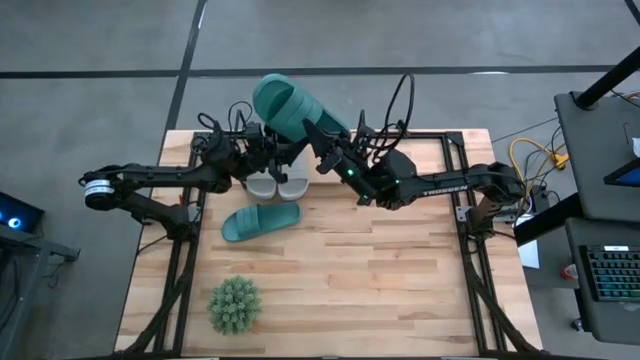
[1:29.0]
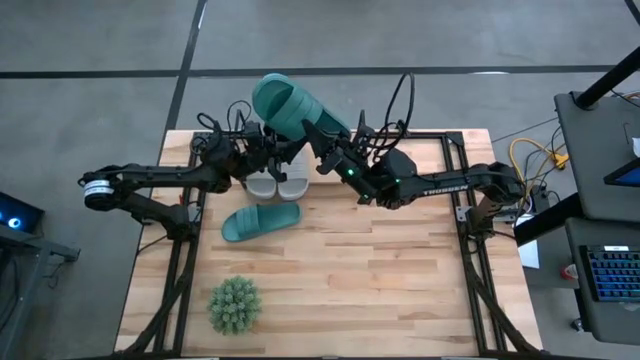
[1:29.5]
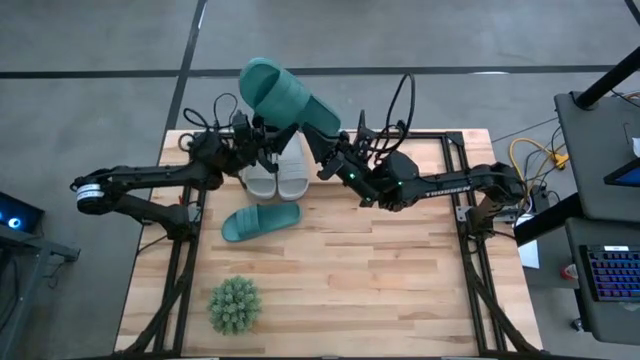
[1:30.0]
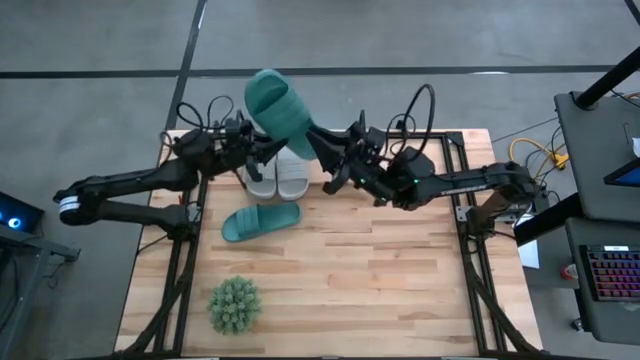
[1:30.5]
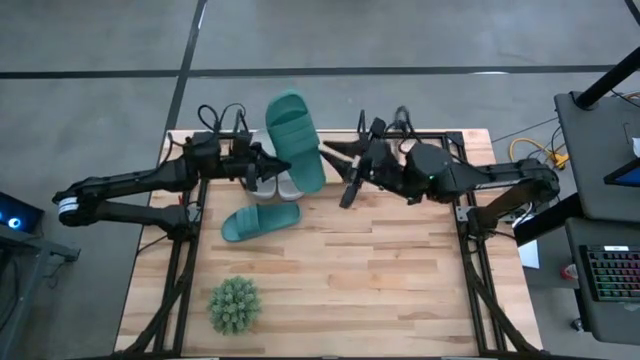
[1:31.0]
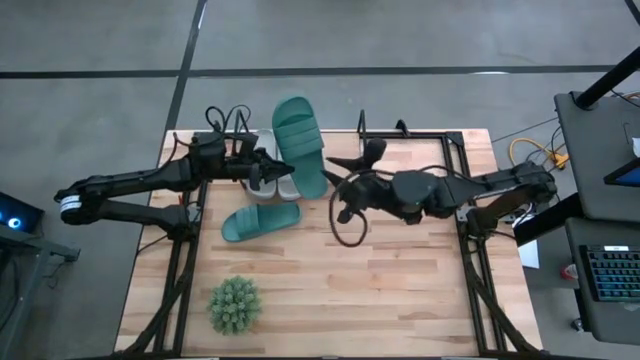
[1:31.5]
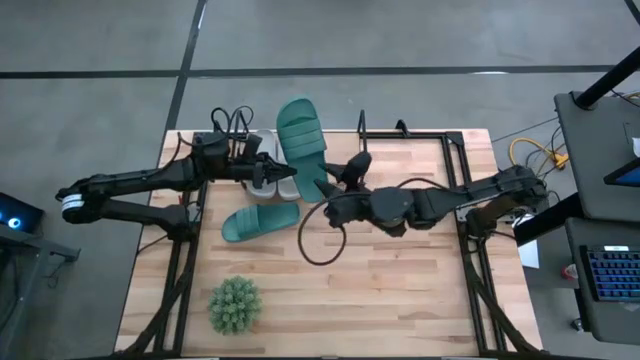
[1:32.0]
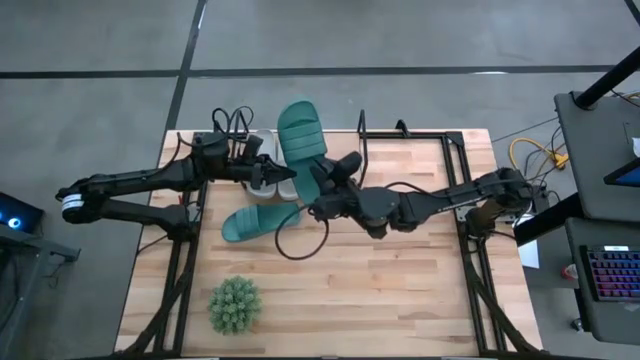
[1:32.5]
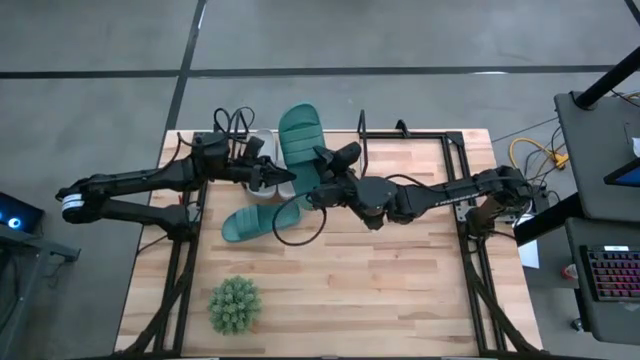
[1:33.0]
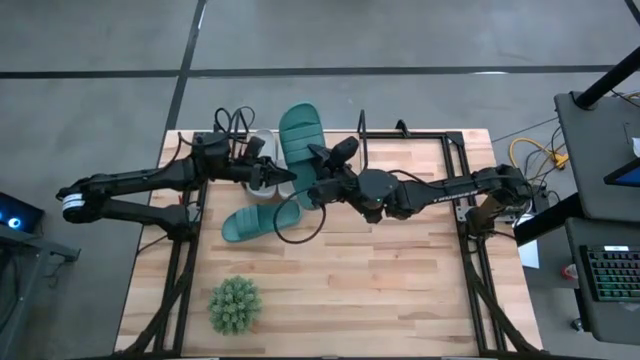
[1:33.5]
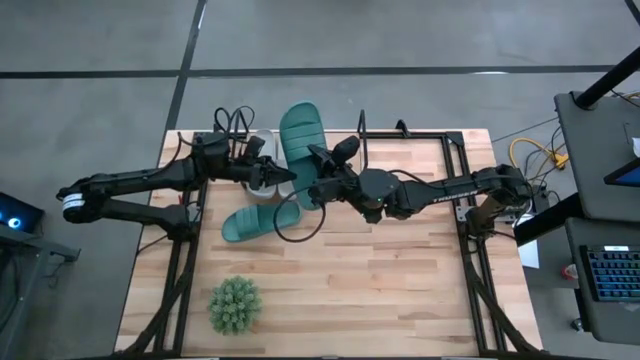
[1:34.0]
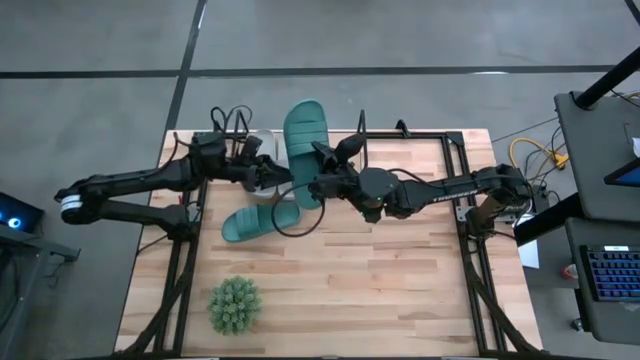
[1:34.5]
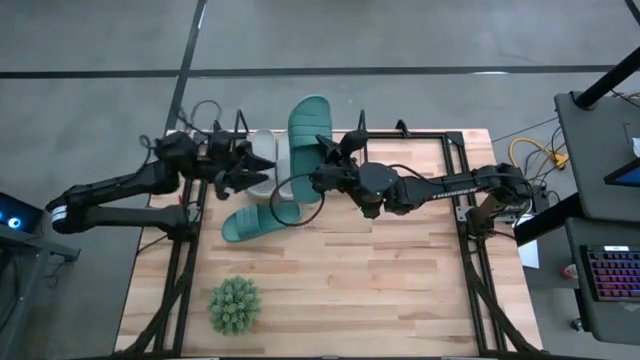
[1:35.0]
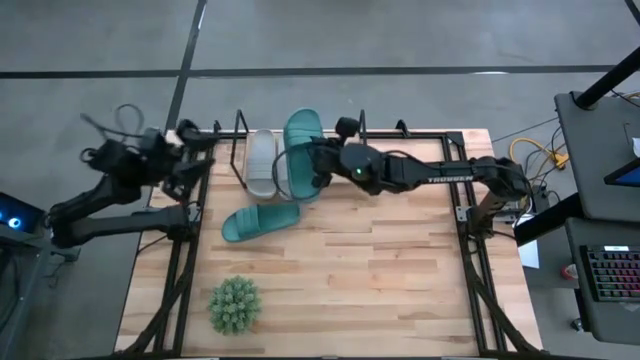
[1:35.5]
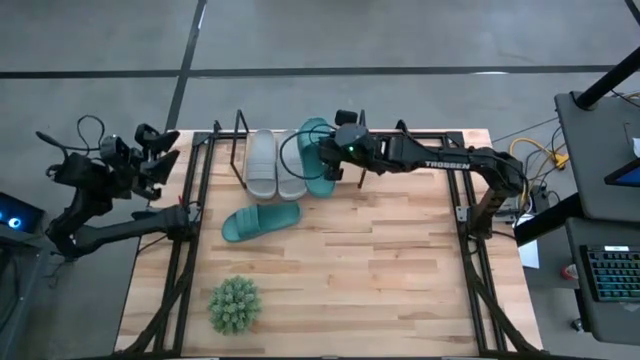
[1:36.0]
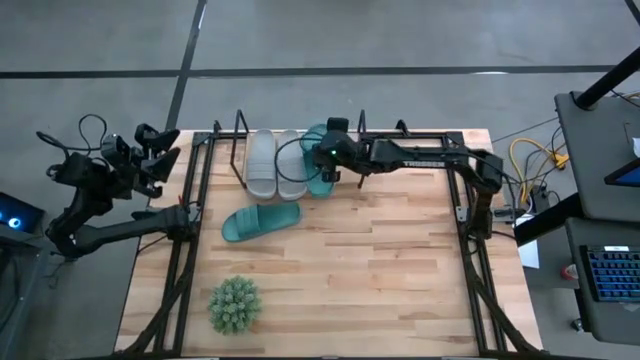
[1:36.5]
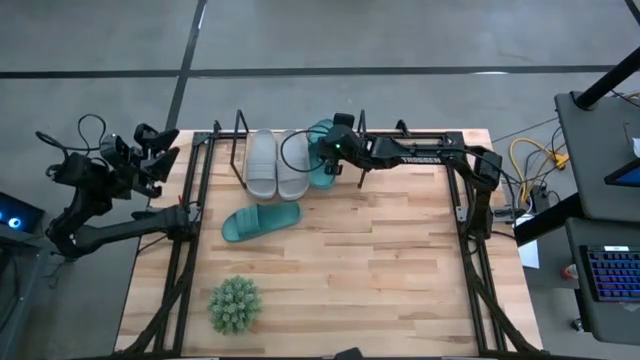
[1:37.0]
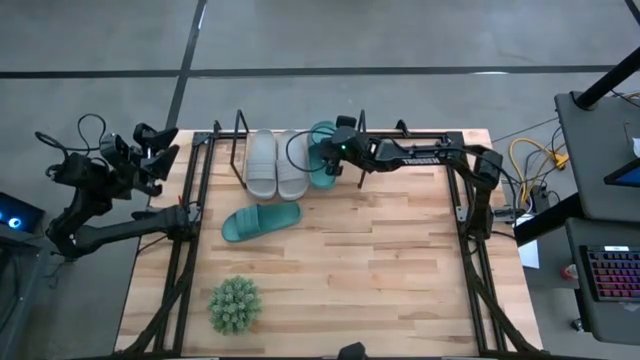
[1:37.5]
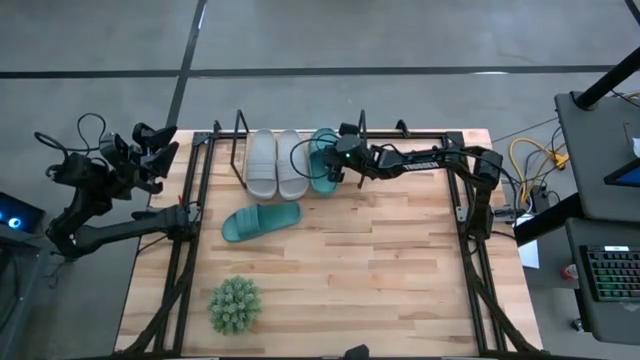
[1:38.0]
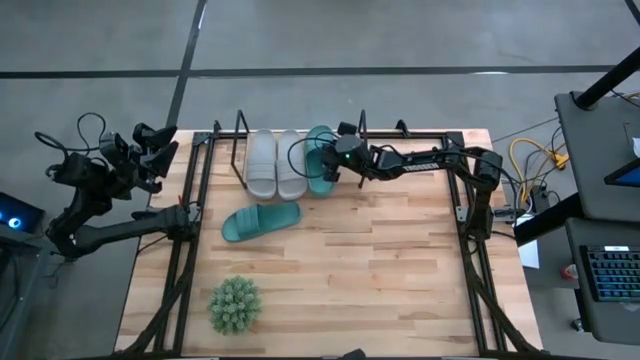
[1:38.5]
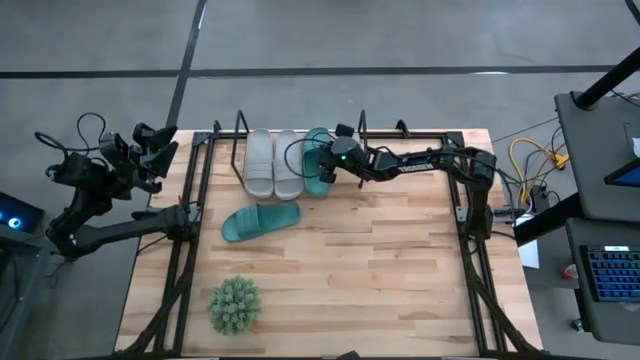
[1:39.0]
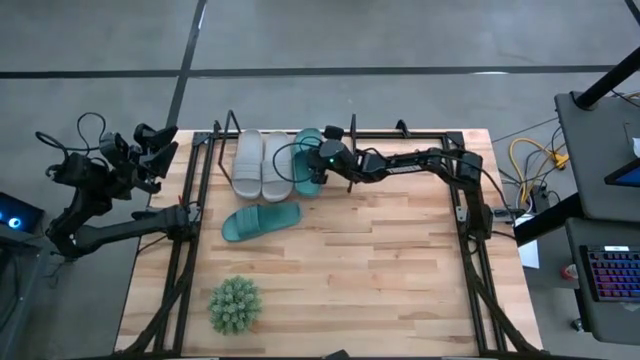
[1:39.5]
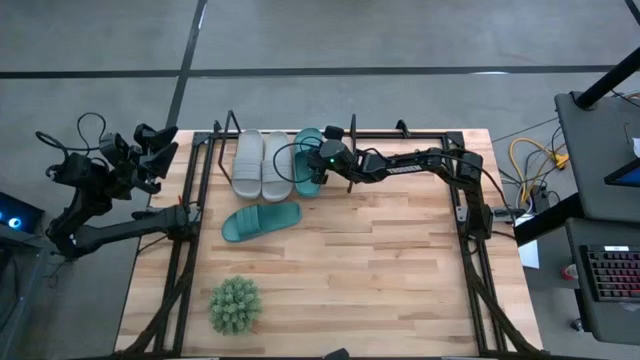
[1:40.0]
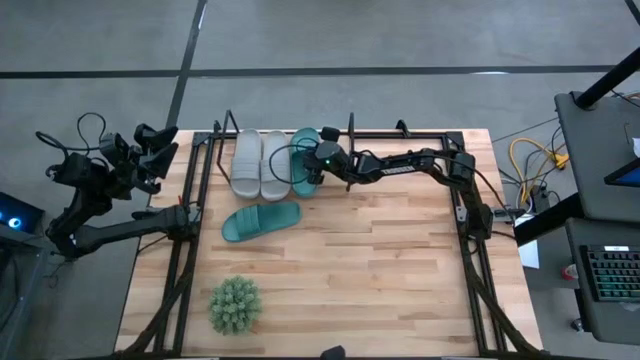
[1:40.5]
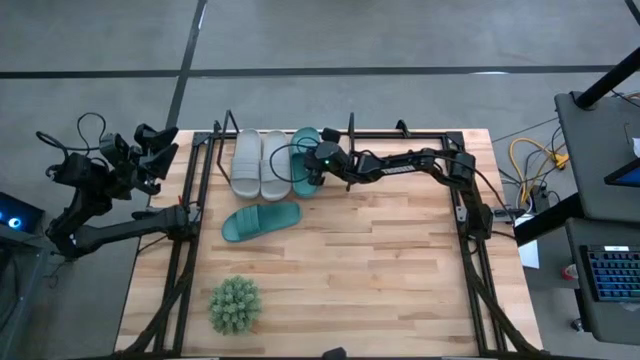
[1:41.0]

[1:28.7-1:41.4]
Task: Pick and place slides into the shelf
Put the bottom green slipper on the shelf

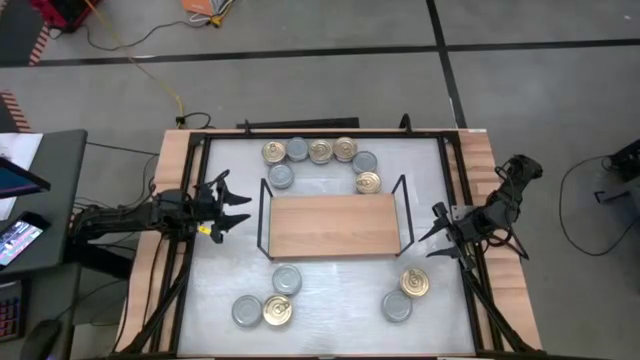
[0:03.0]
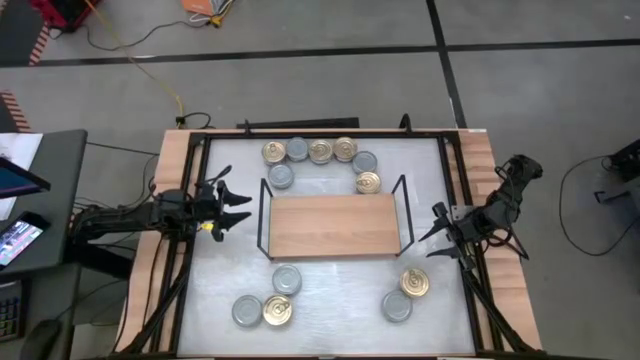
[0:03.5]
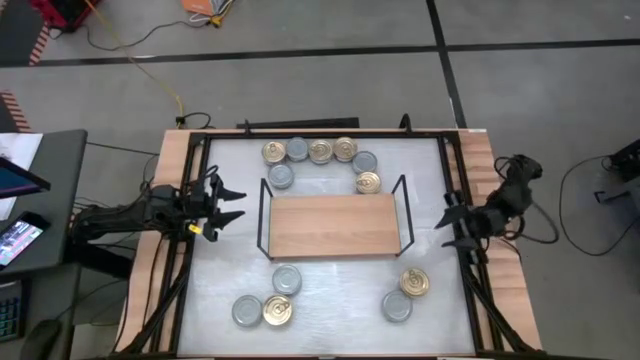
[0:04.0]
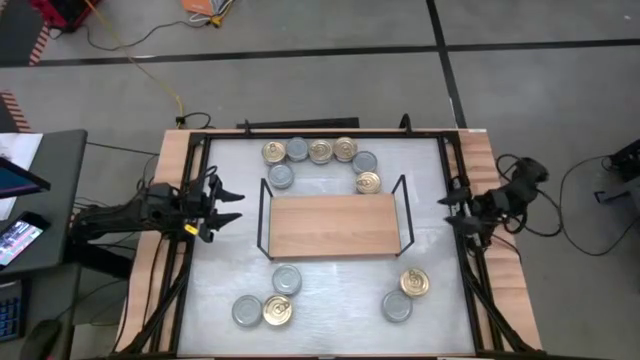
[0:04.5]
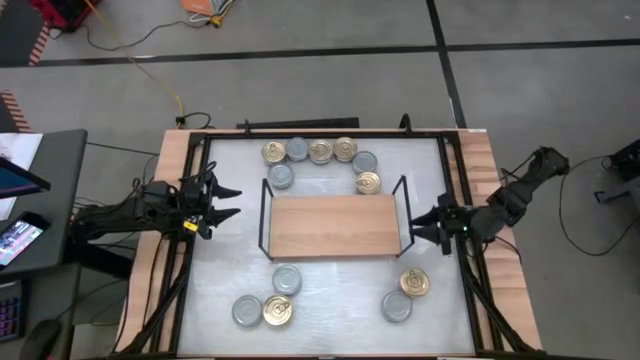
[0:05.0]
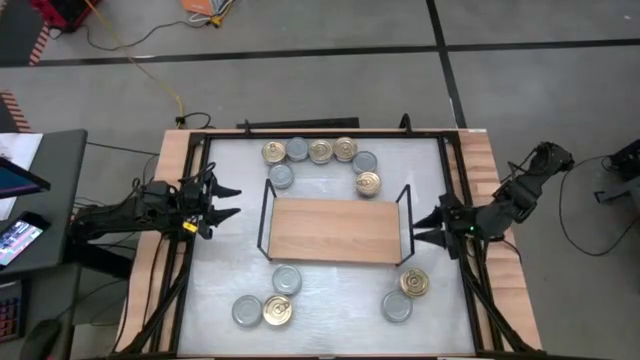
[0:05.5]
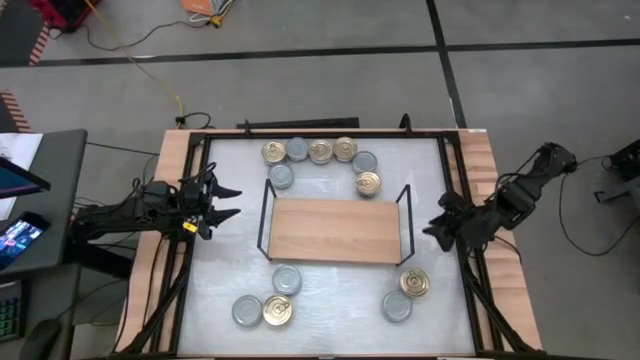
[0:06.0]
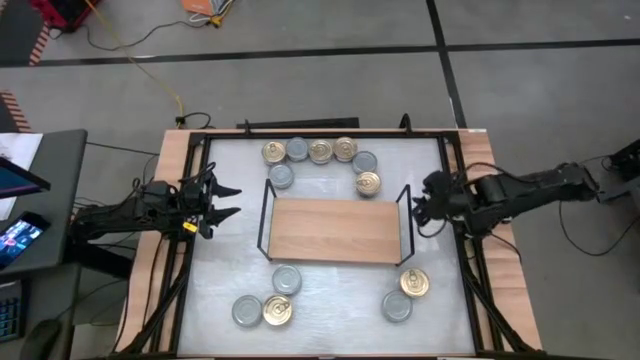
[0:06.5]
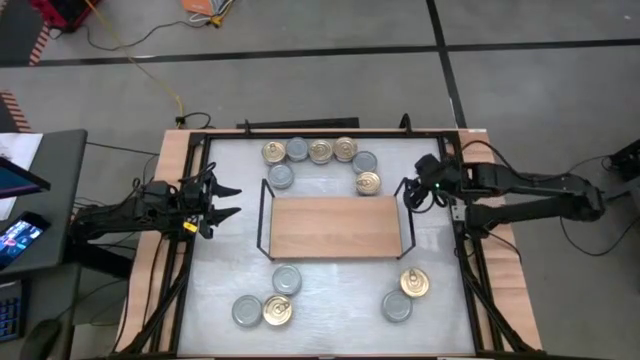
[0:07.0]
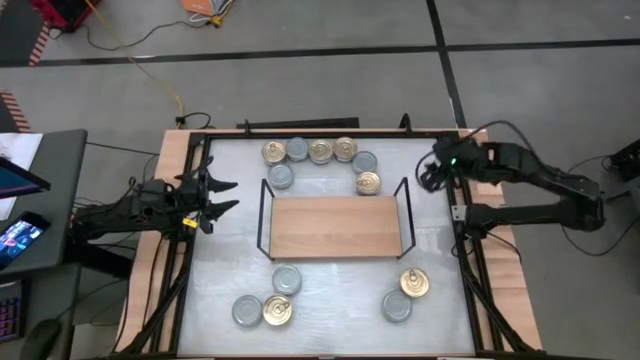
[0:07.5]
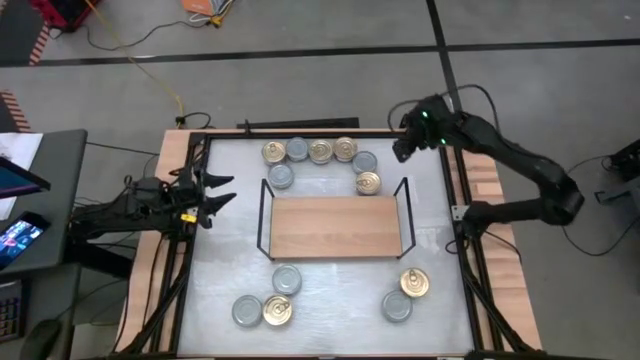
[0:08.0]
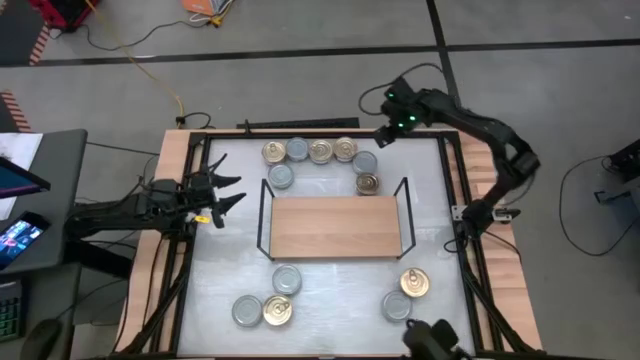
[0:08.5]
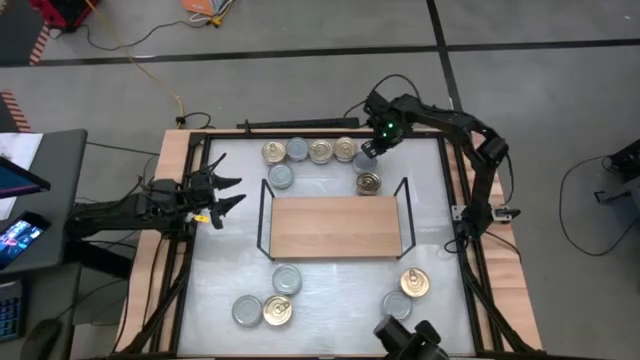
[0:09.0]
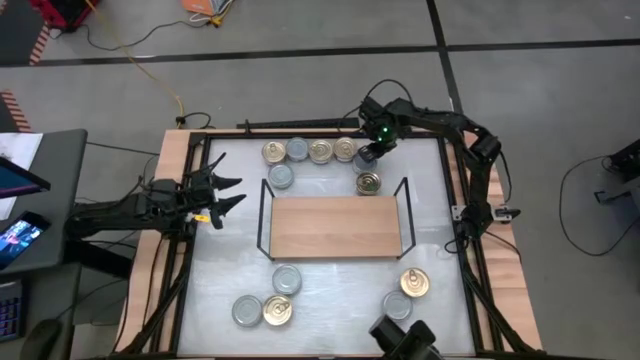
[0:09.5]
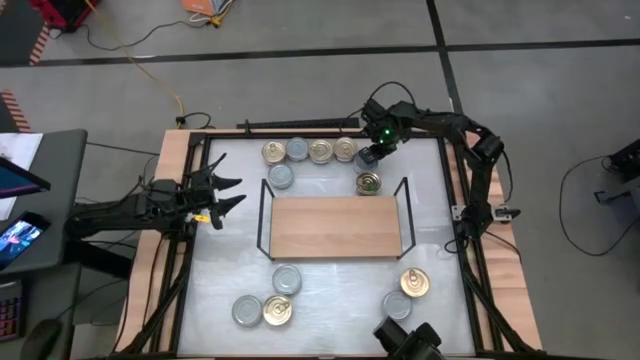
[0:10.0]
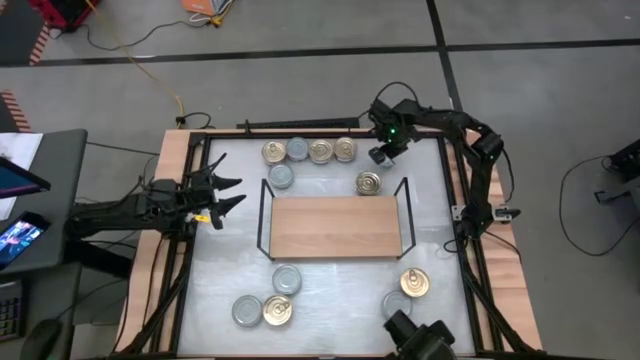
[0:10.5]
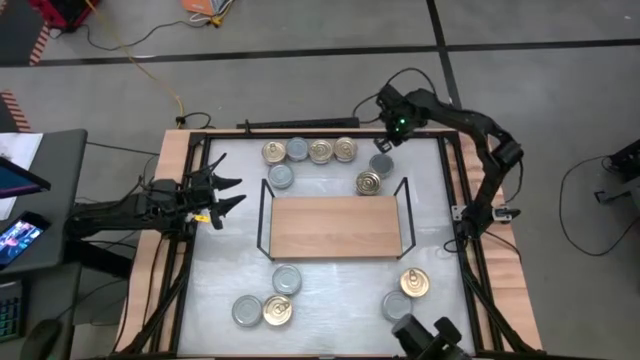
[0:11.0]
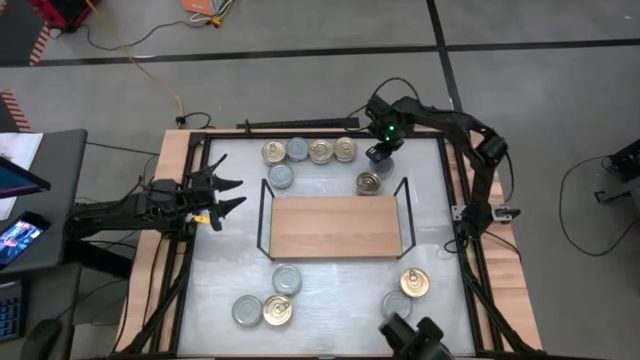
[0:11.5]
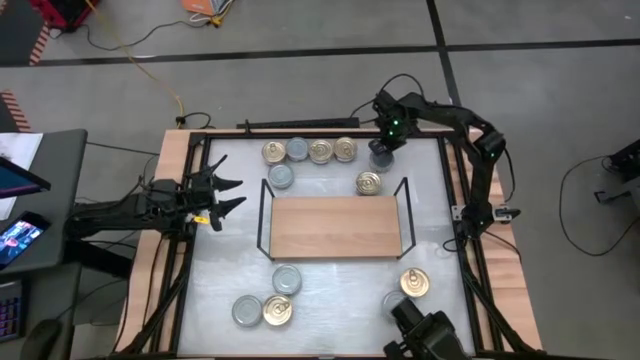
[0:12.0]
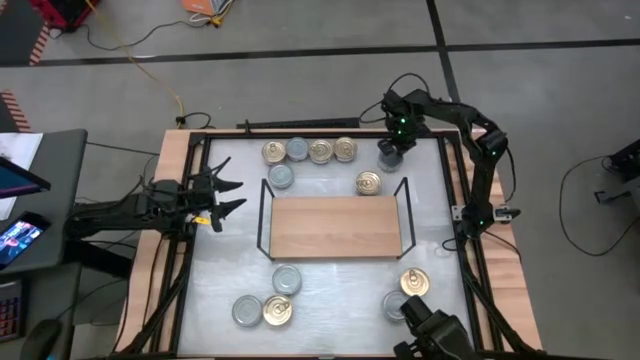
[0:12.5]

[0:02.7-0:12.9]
Task: Stack canned seafood by type on shelf
Put the green tuna can on the shelf
